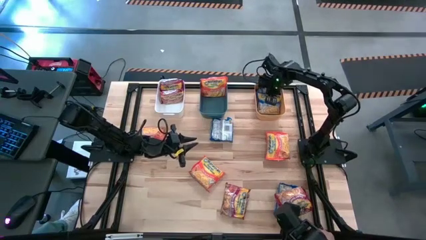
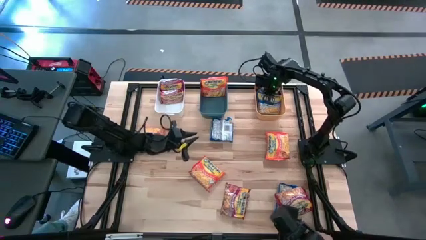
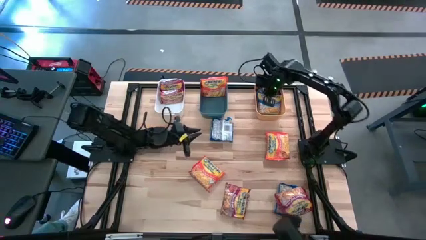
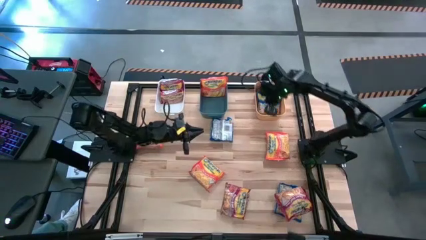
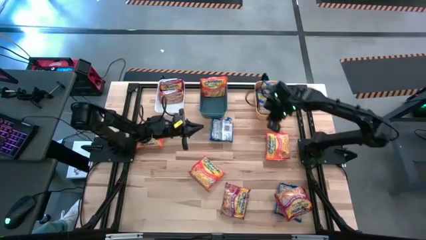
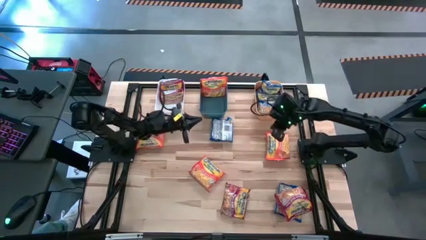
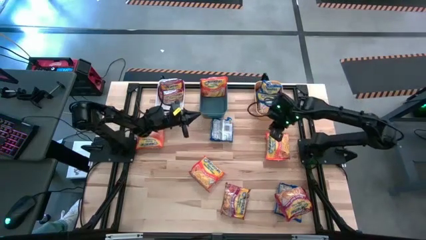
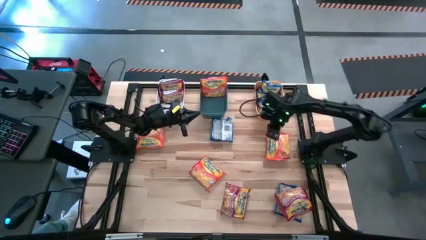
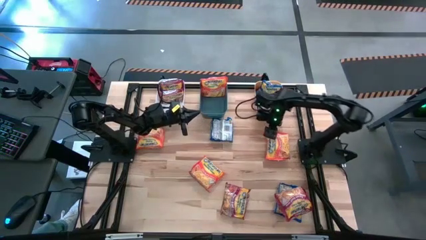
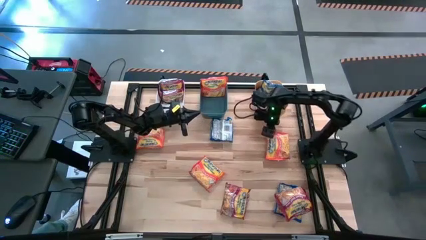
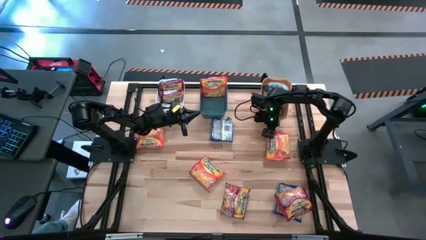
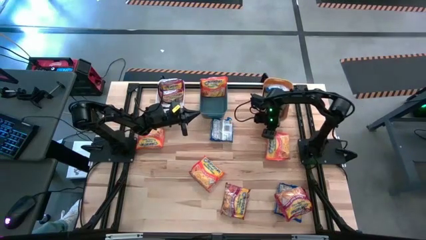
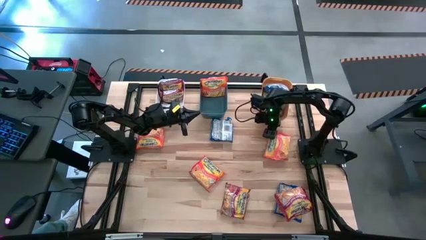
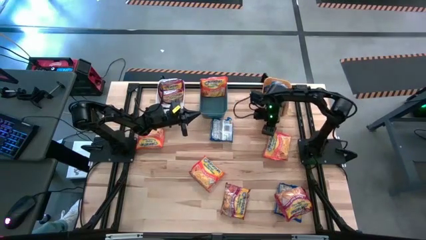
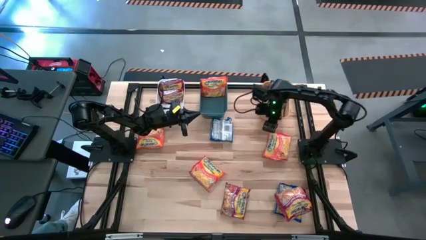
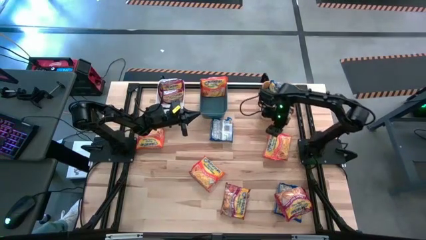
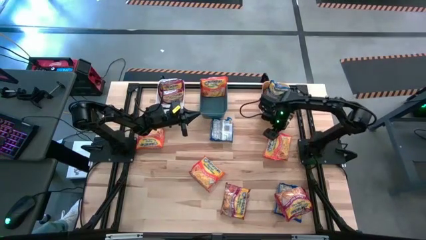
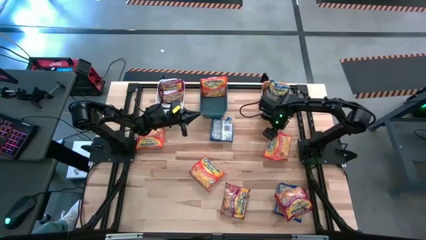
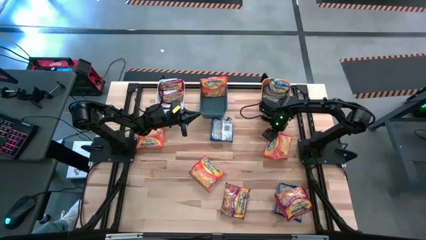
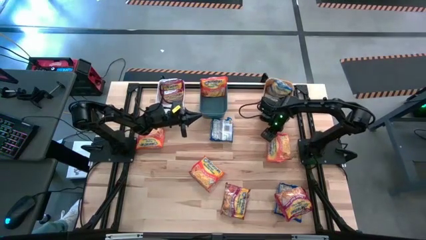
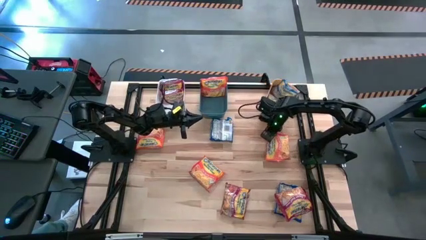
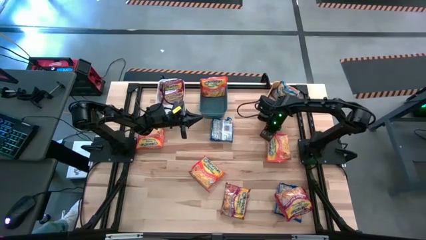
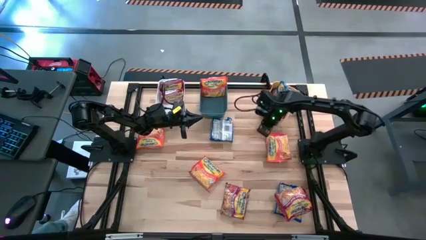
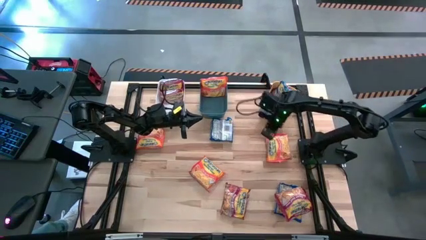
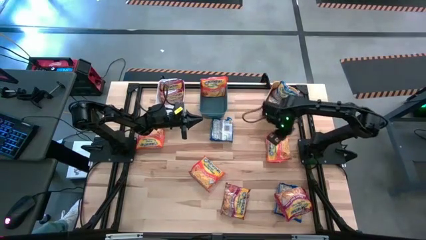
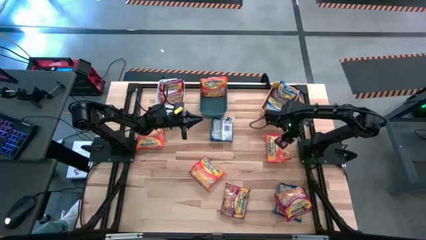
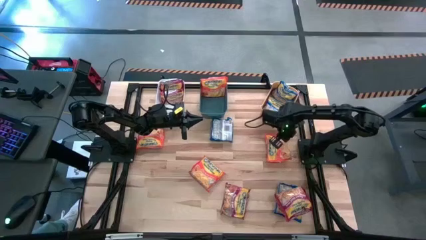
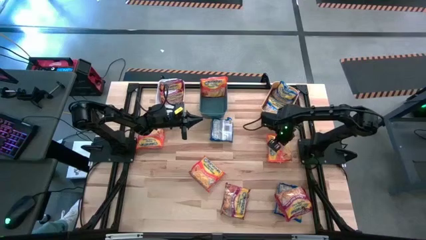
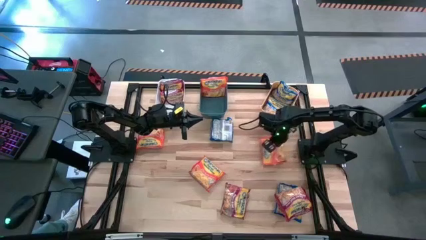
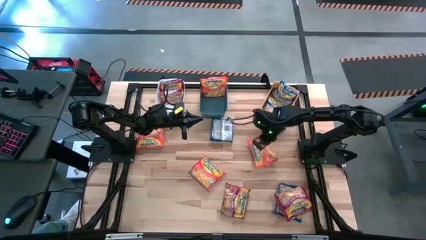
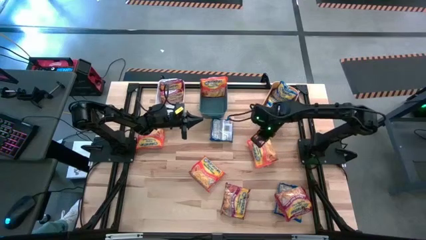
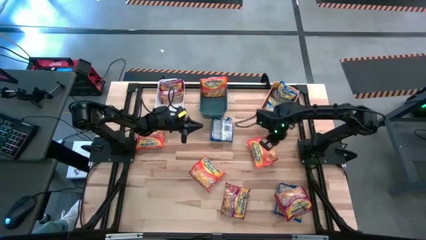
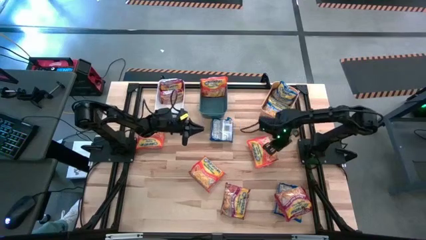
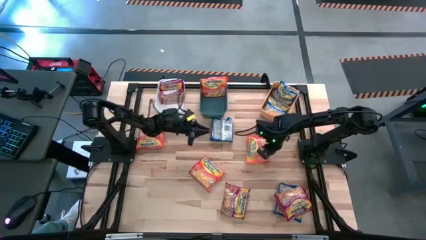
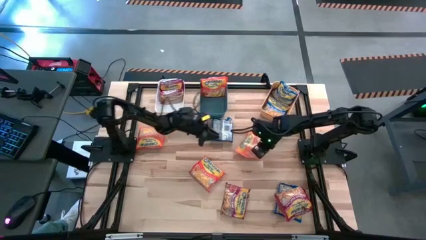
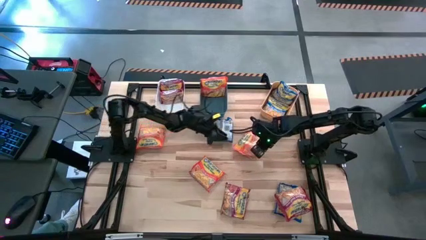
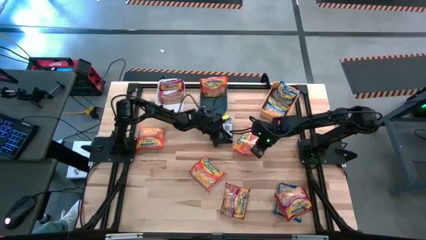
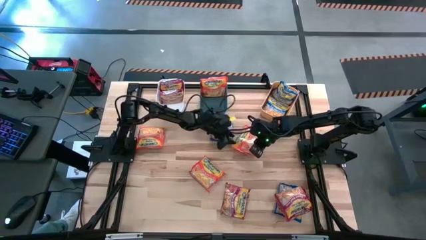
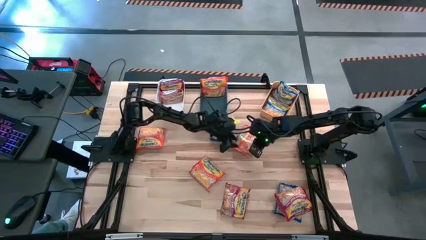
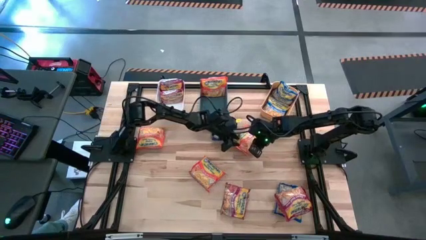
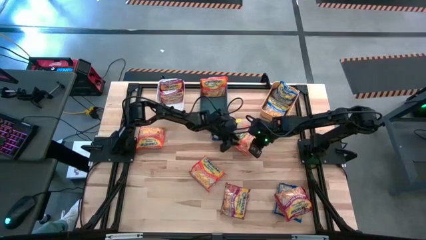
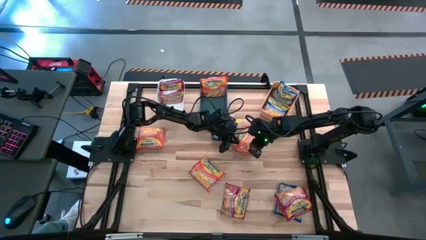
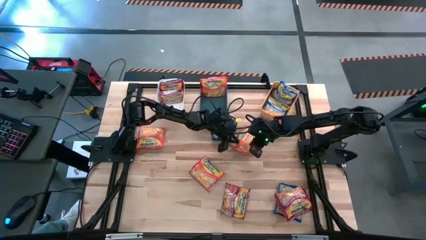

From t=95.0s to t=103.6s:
Task: Sort Maruchan noodles
Put the orange noodle pack into the blue bin

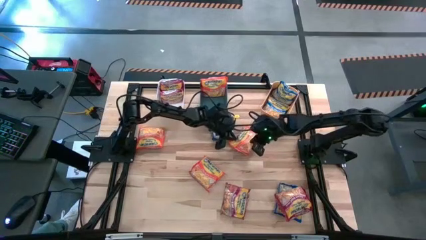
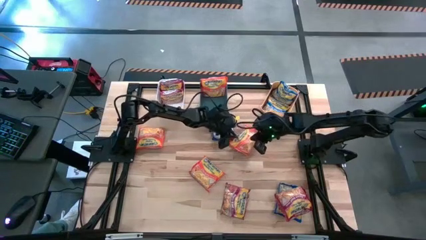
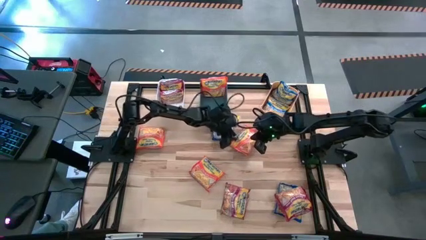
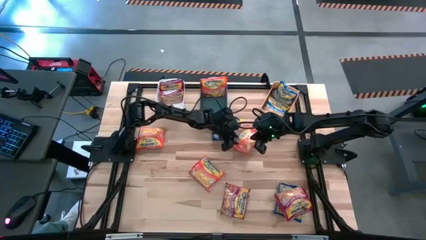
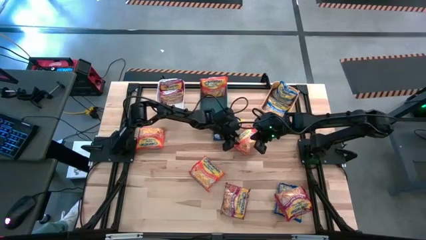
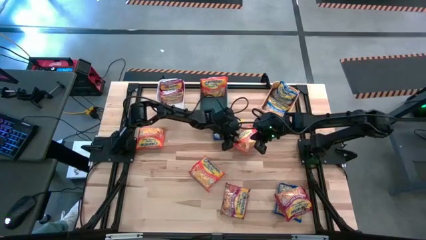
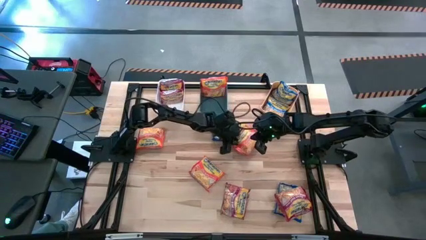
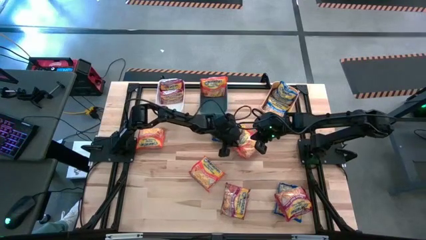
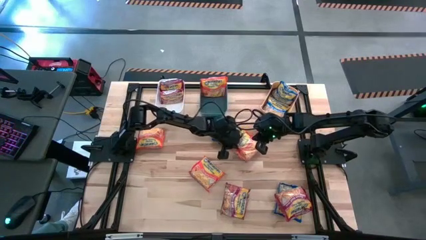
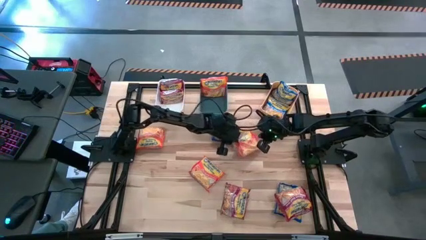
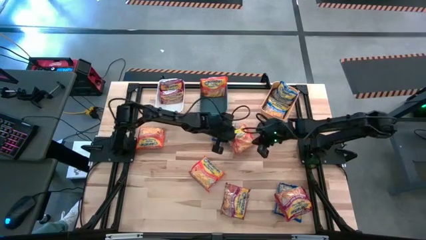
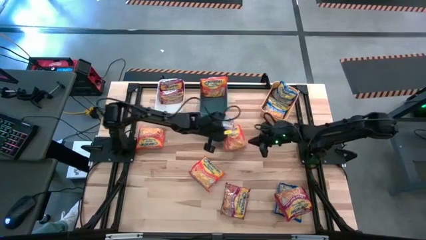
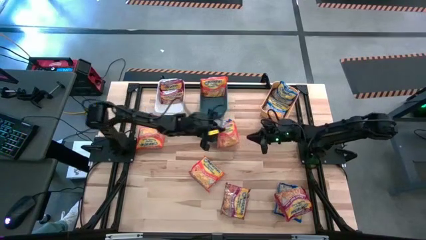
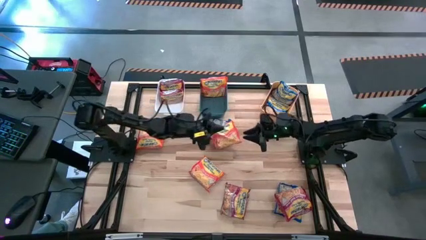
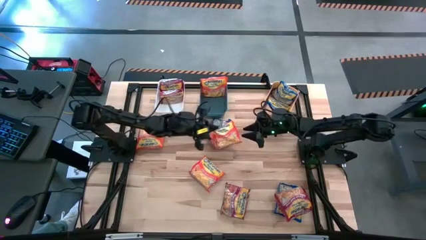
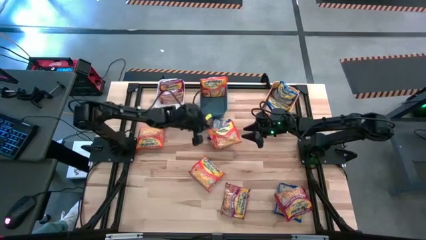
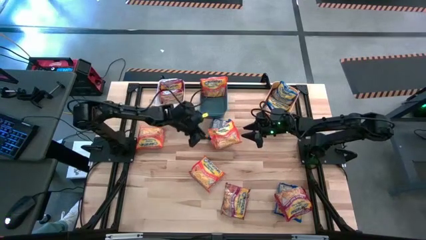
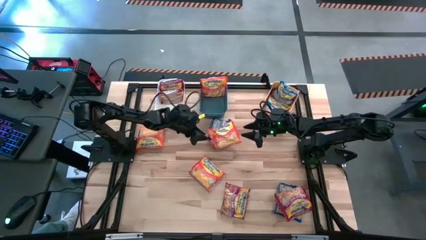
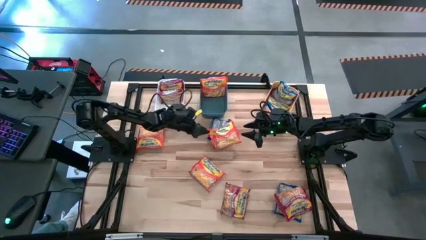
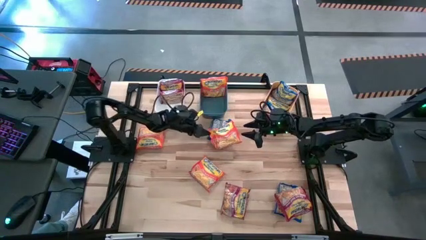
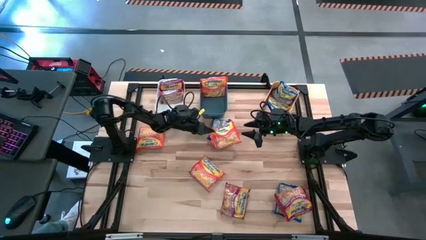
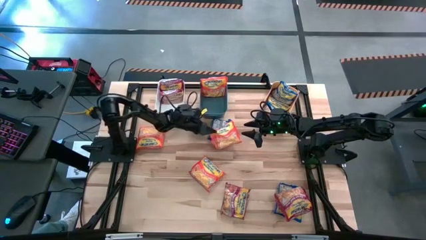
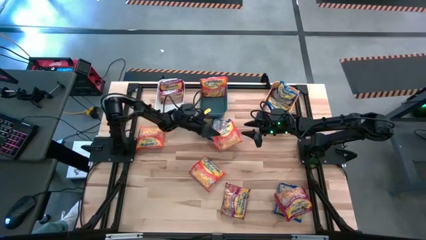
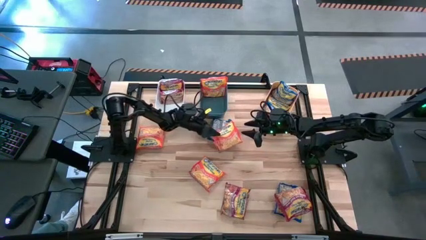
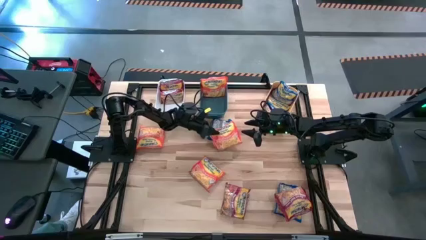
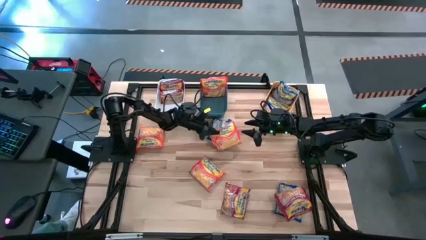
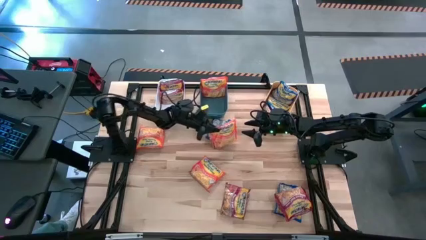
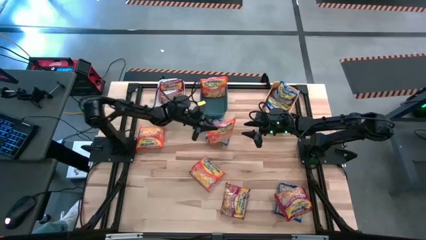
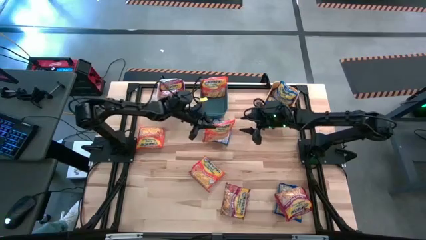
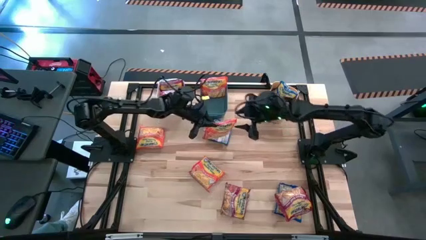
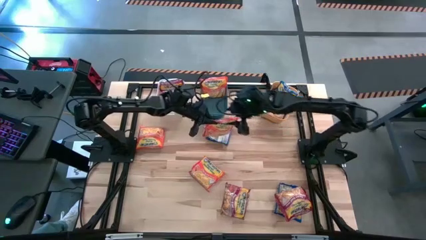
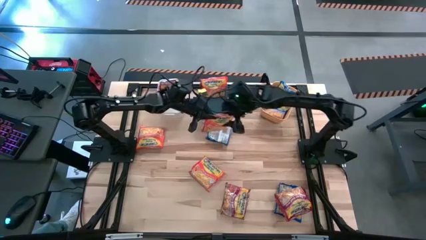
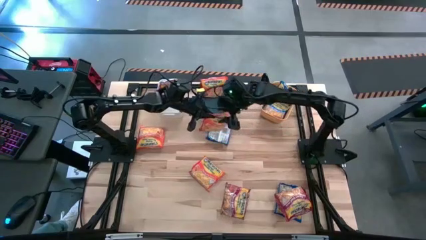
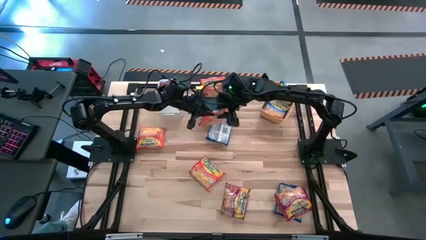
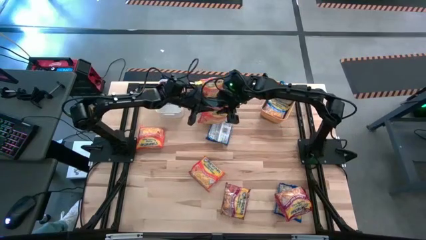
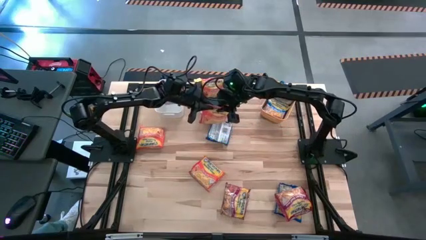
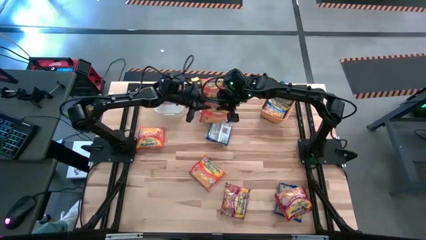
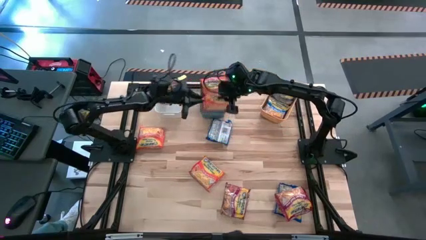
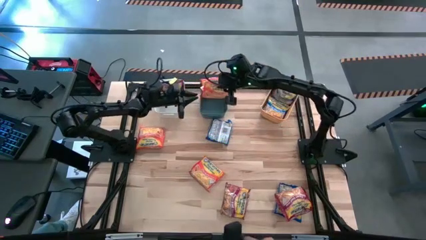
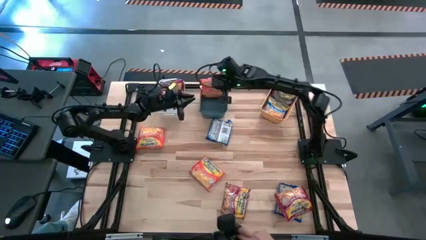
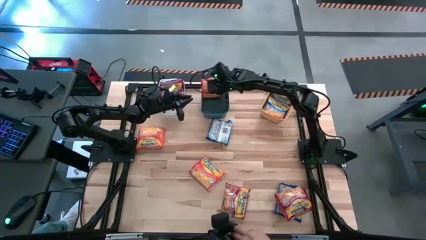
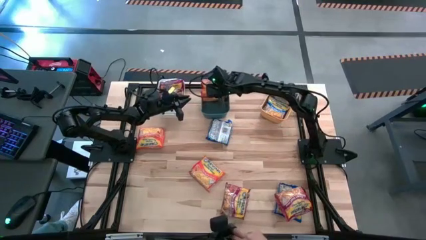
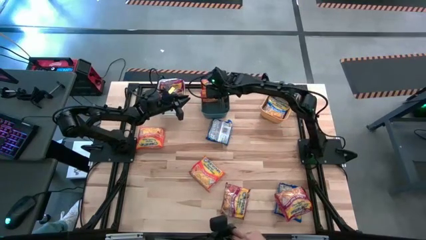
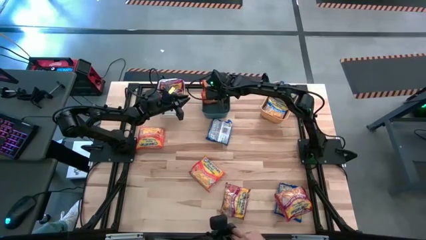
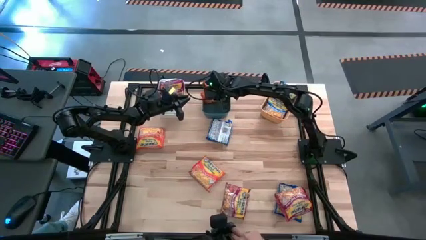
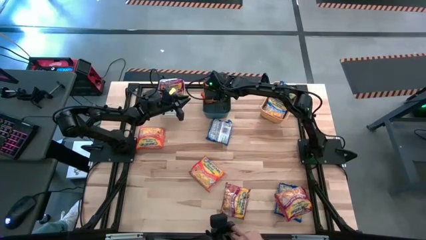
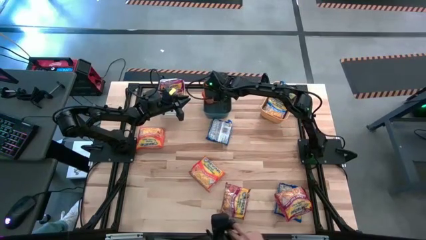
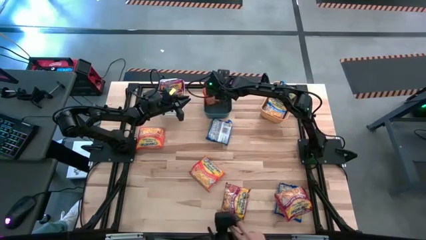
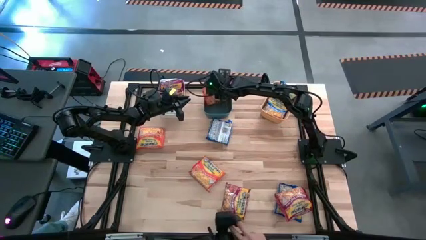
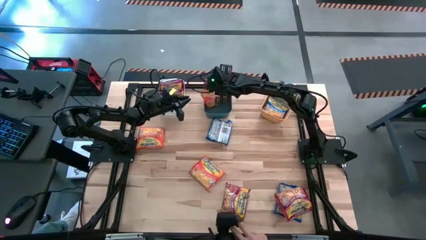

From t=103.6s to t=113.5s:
Put the orange noodle pack into the blue bin
